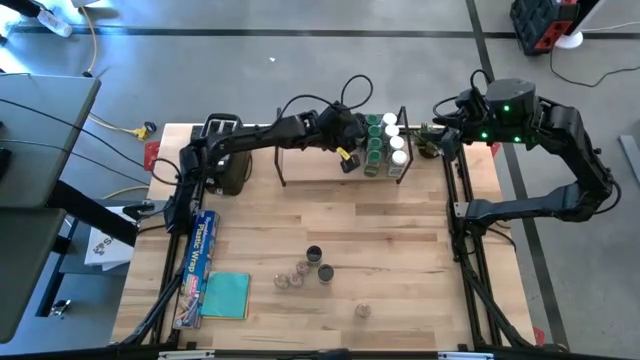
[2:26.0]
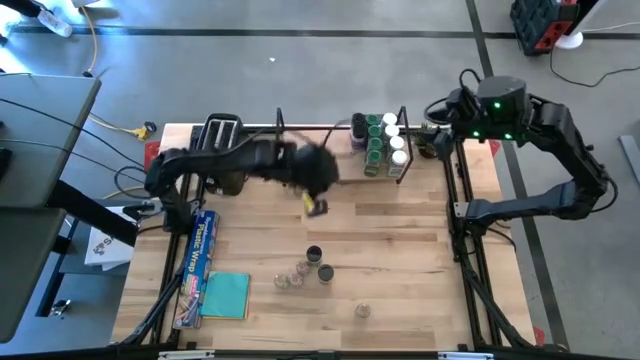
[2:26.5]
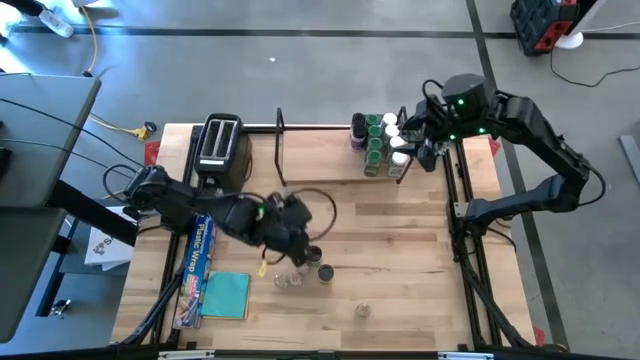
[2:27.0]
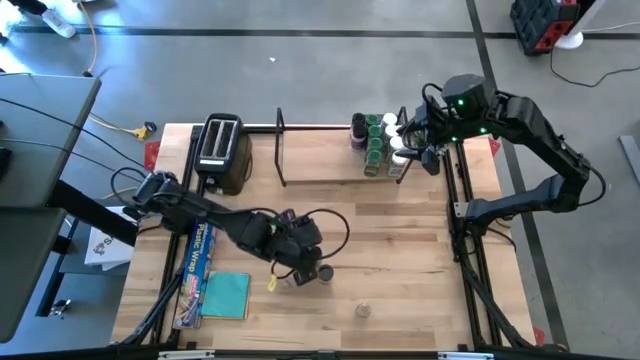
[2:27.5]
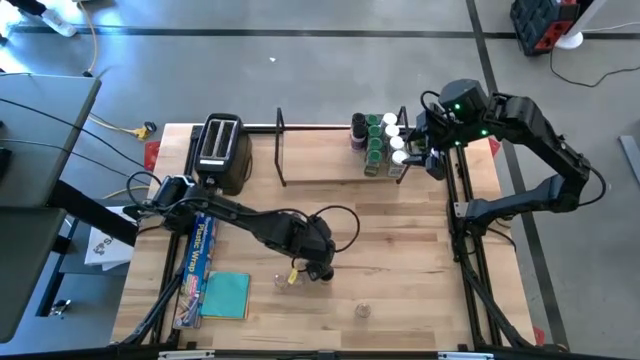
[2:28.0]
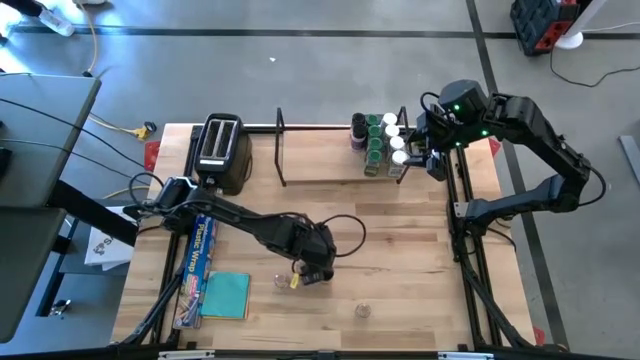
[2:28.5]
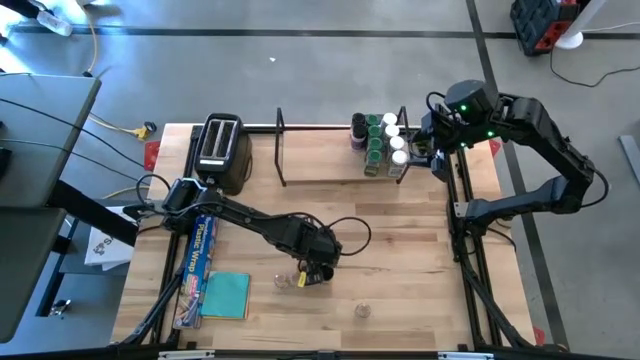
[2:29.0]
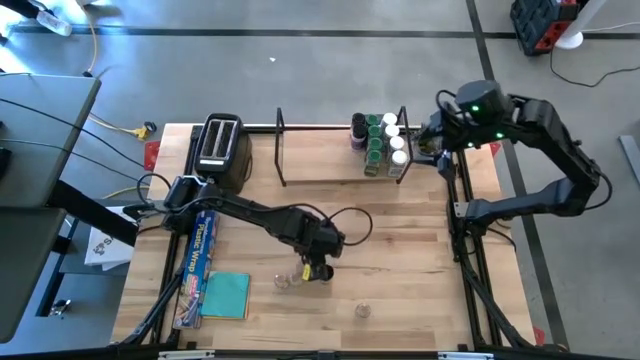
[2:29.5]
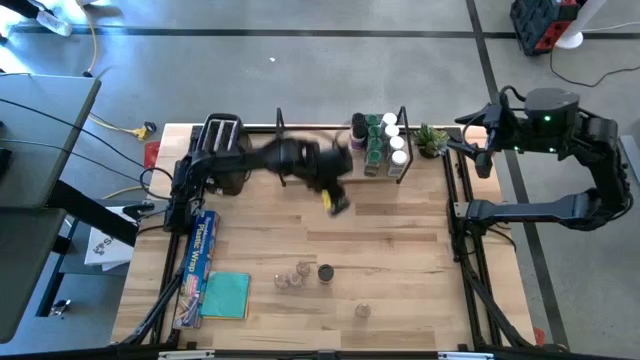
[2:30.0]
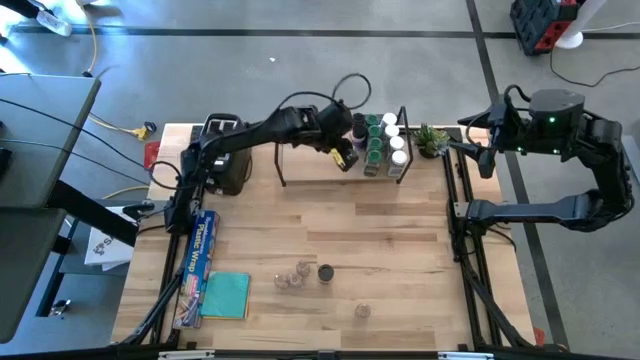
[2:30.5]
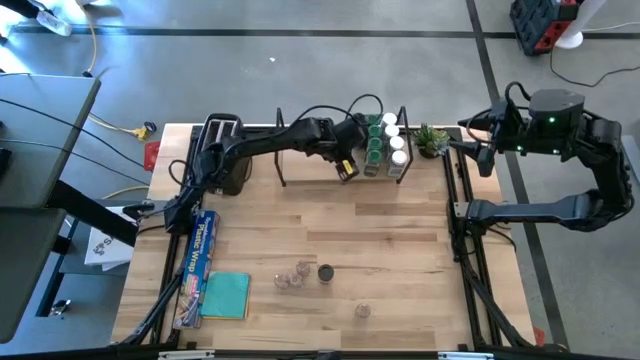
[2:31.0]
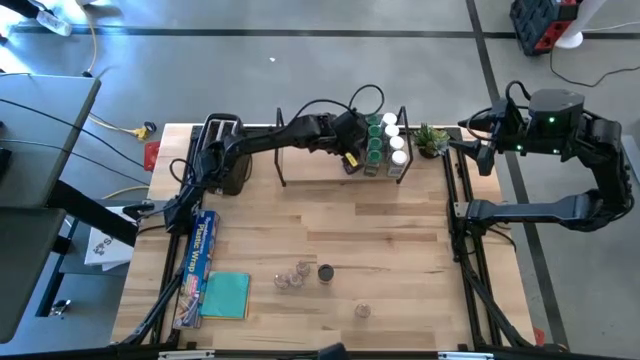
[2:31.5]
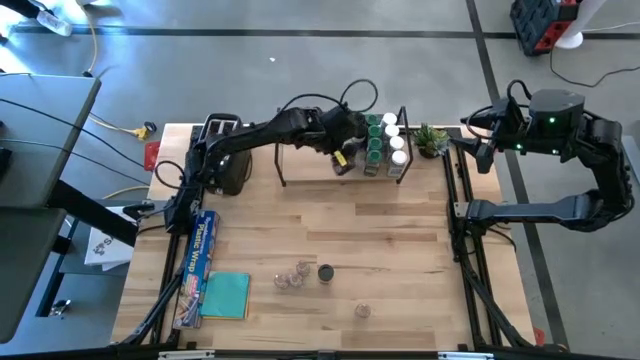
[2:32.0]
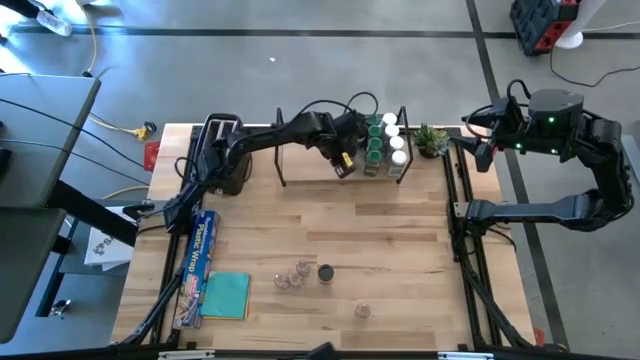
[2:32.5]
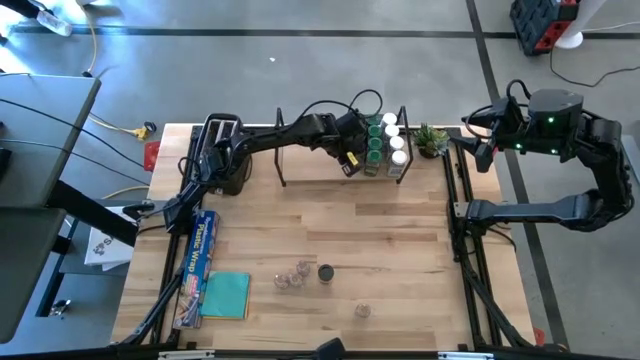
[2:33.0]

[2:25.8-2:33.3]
Task: Shelf spices
Put the black seasoning bottle on the shelf and align it with the other black seasoning bottles

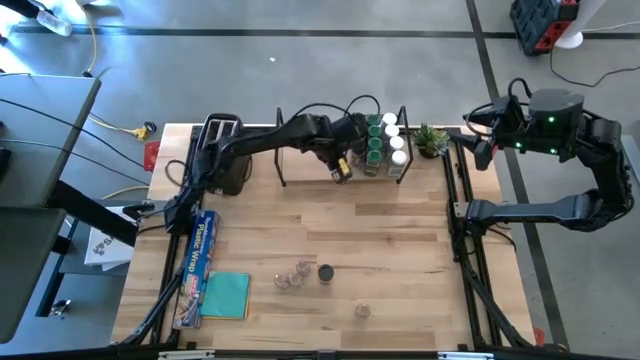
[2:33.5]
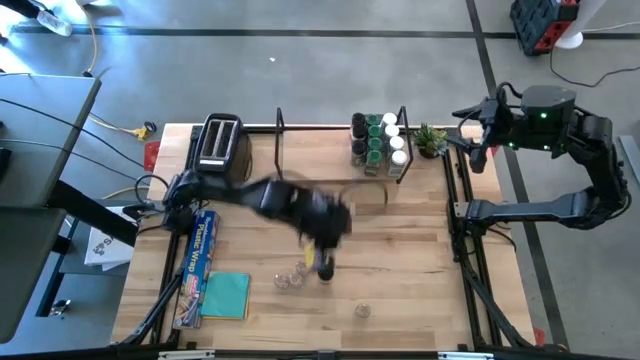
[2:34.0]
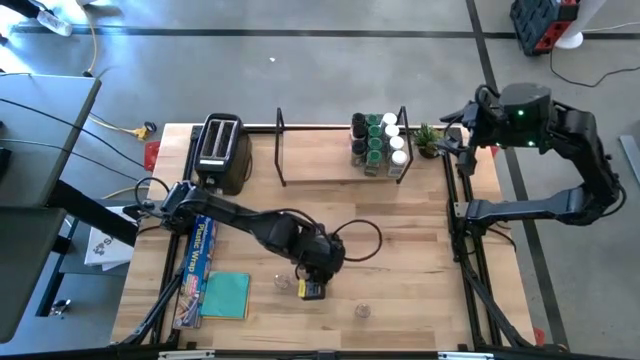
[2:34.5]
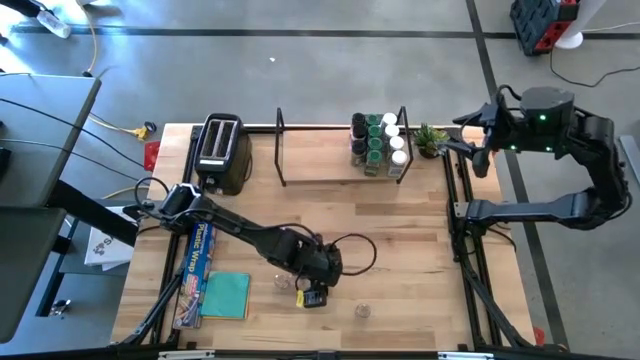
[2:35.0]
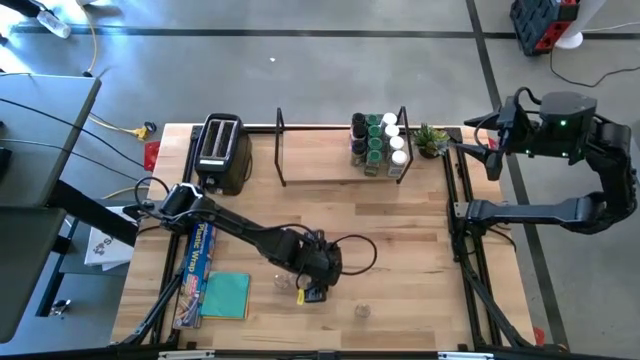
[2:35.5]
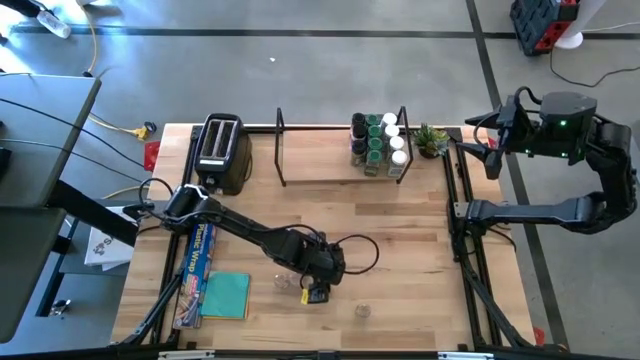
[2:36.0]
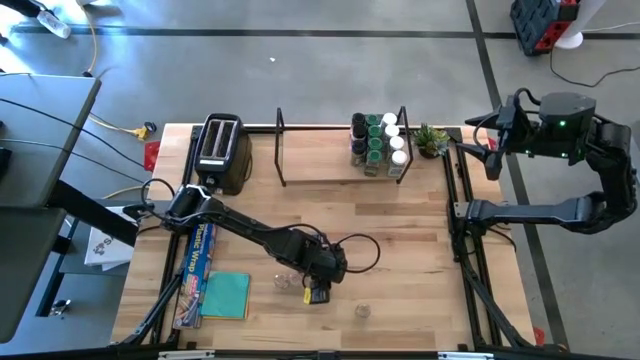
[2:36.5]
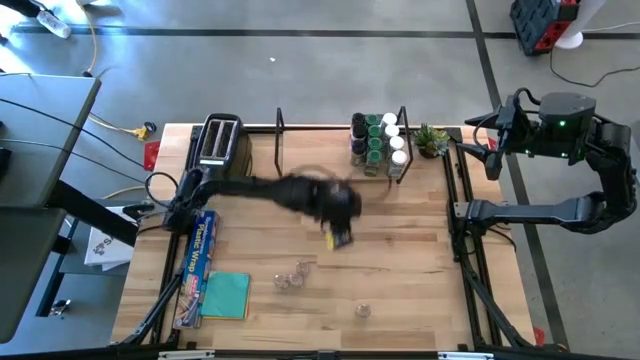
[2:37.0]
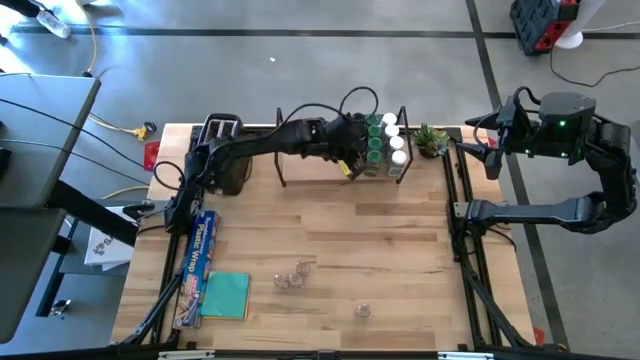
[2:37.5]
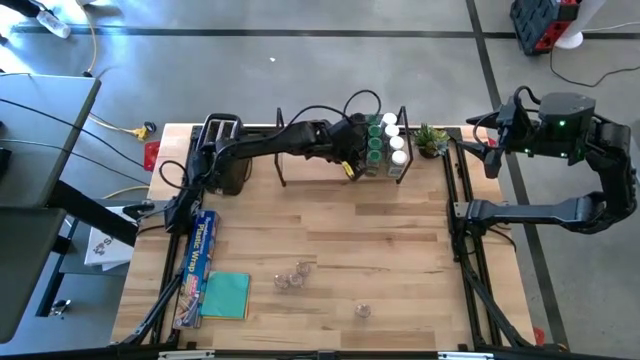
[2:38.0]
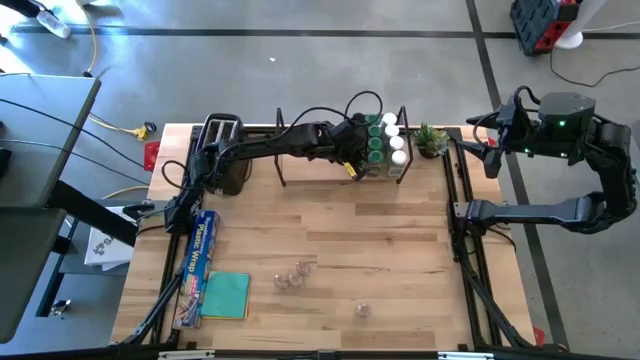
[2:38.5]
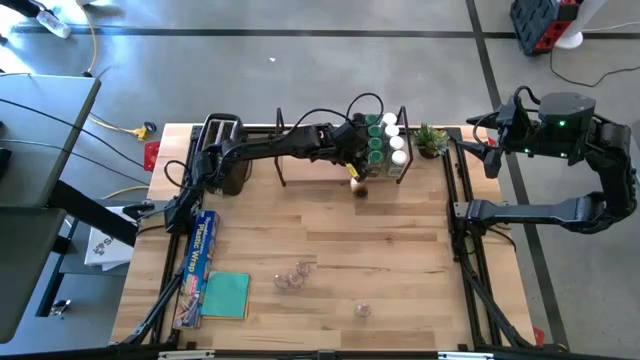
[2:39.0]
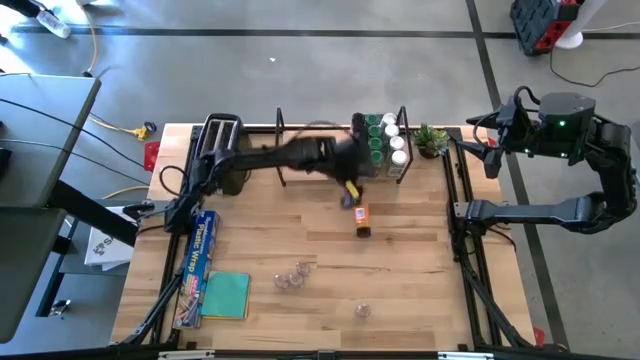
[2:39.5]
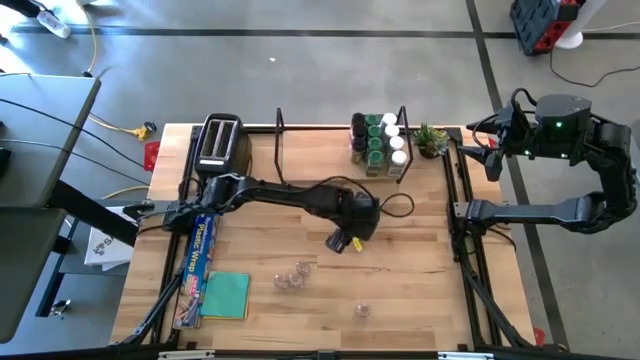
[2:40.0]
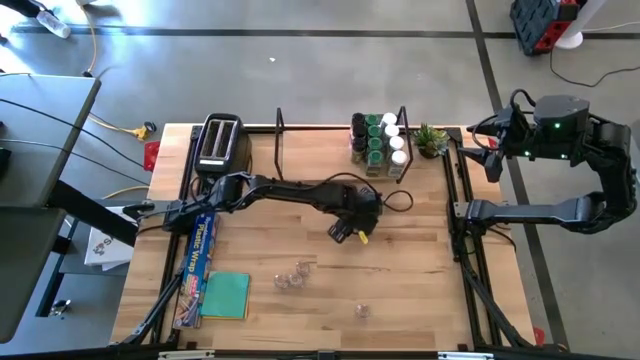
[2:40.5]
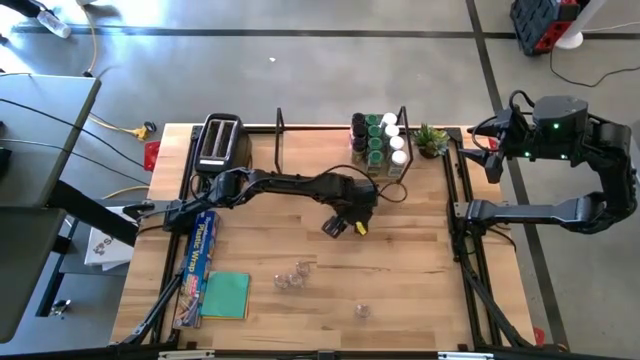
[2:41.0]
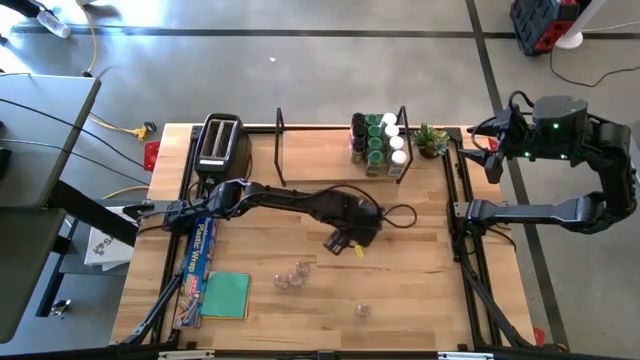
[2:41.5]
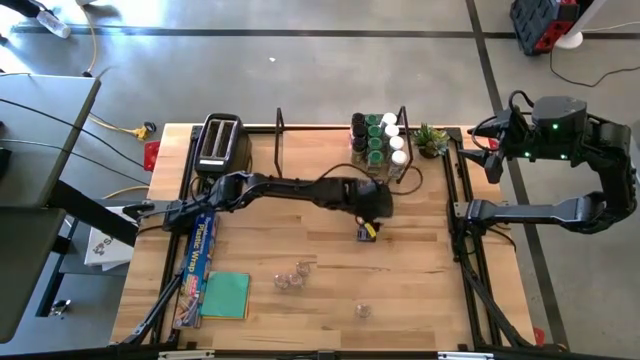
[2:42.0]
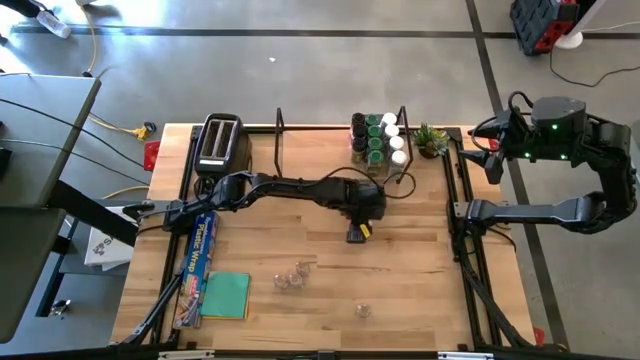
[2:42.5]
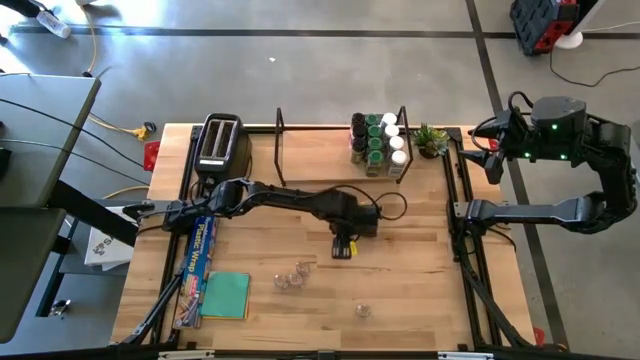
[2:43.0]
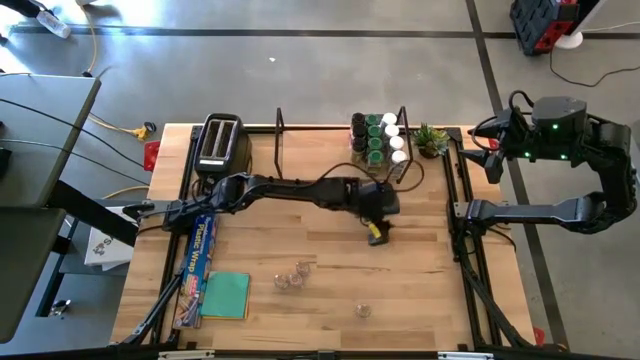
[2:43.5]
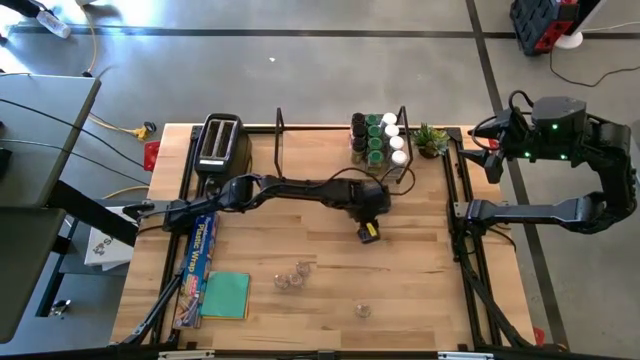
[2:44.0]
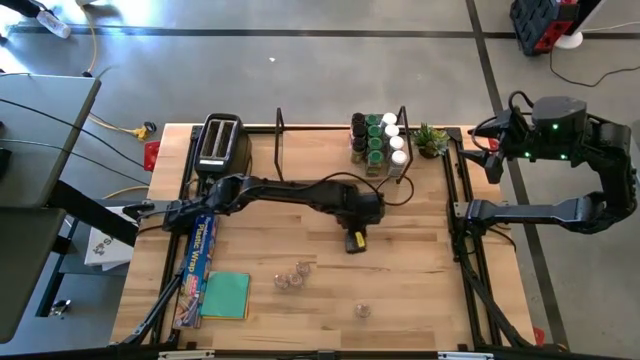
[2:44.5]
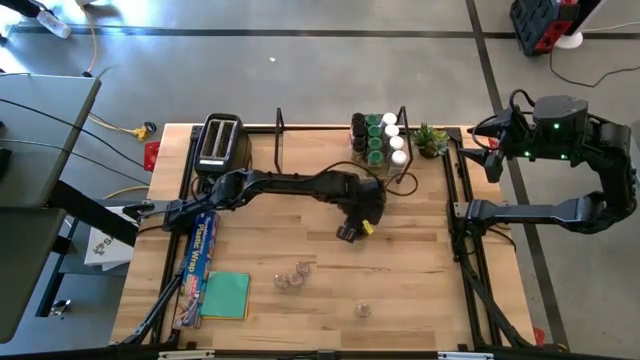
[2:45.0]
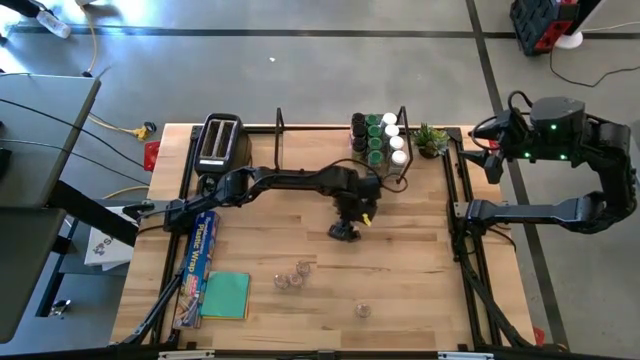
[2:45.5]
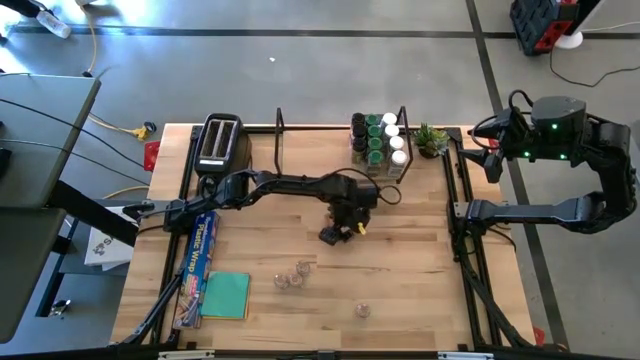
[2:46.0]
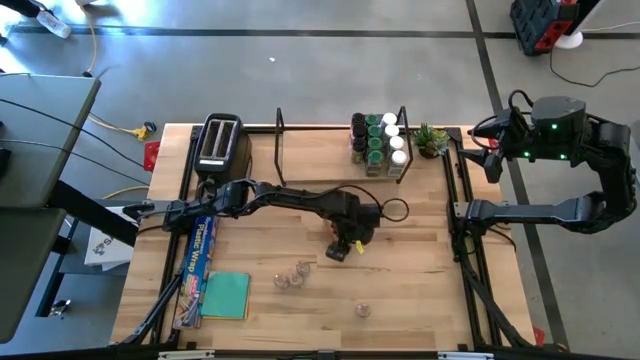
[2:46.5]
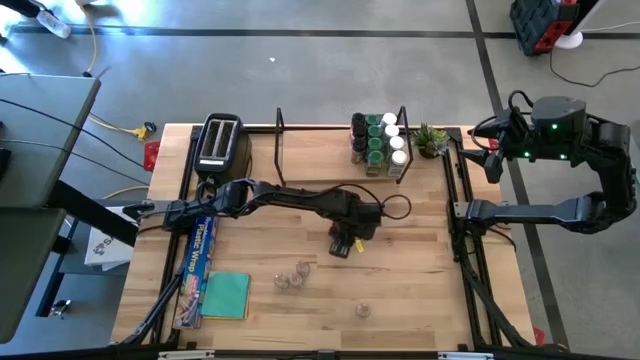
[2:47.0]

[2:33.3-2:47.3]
Put the black seasoning bottle on the shelf and align it with the other black seasoning bottles
